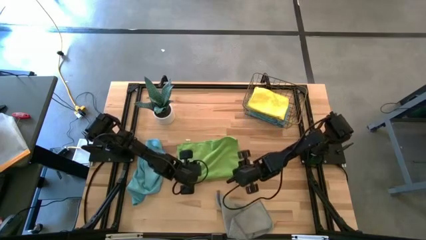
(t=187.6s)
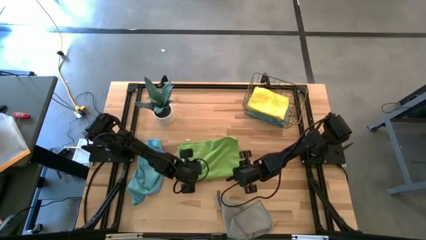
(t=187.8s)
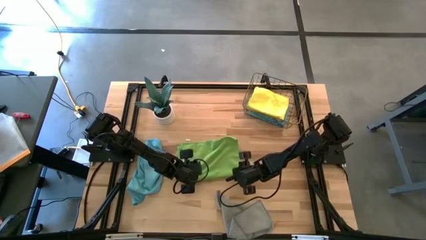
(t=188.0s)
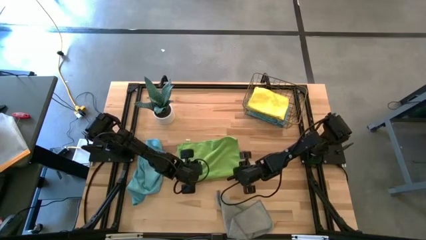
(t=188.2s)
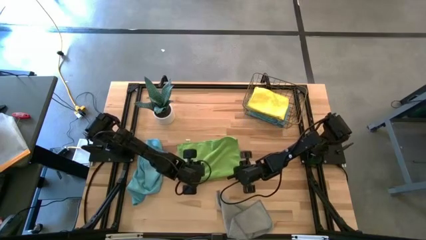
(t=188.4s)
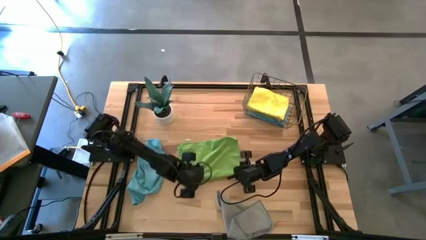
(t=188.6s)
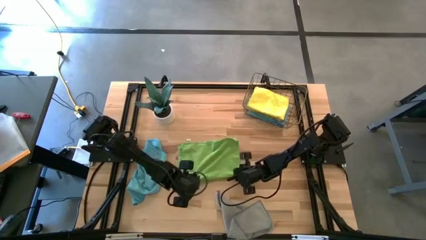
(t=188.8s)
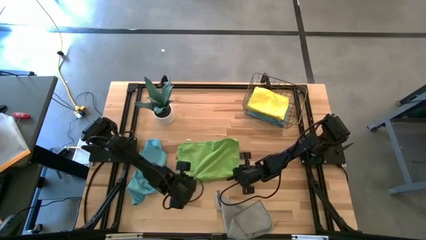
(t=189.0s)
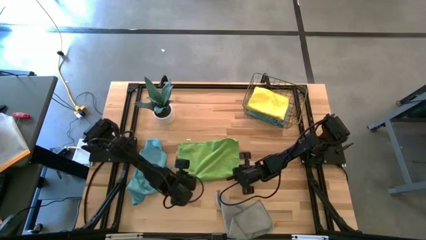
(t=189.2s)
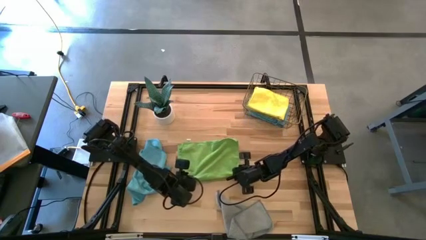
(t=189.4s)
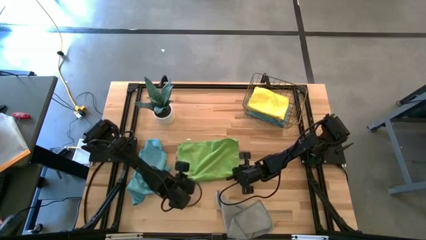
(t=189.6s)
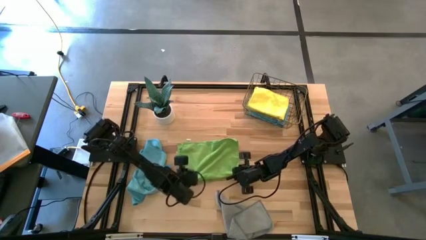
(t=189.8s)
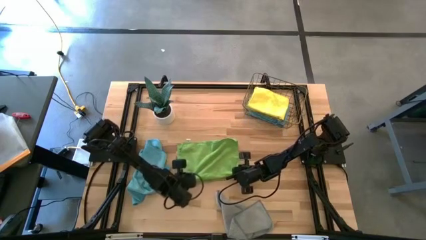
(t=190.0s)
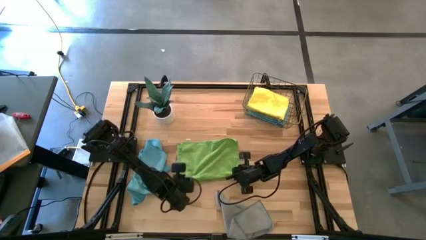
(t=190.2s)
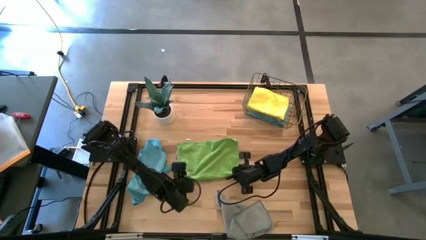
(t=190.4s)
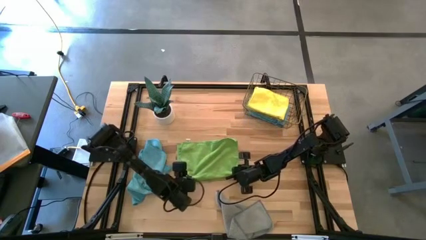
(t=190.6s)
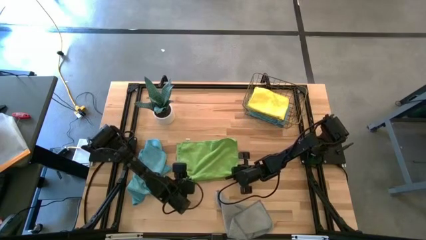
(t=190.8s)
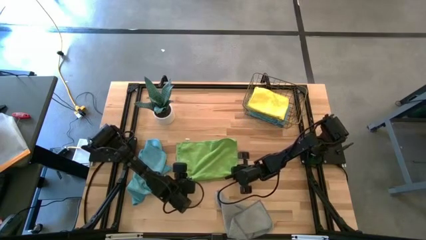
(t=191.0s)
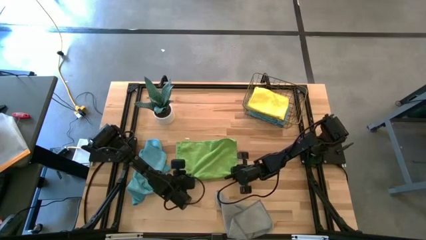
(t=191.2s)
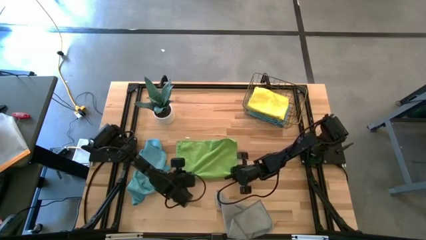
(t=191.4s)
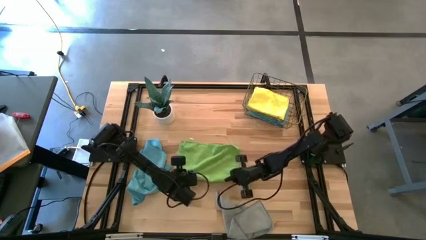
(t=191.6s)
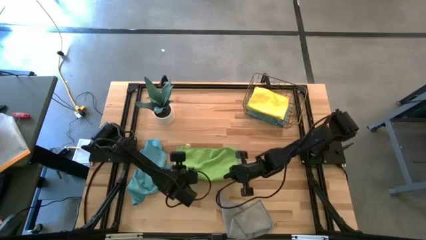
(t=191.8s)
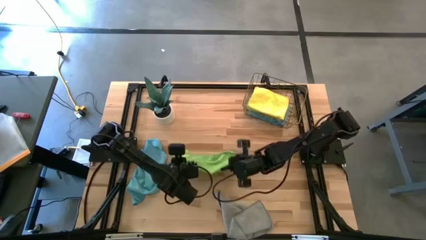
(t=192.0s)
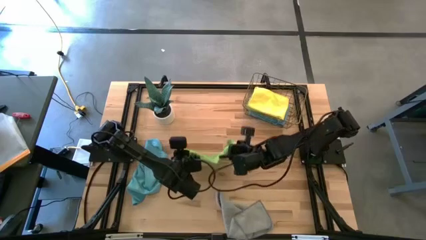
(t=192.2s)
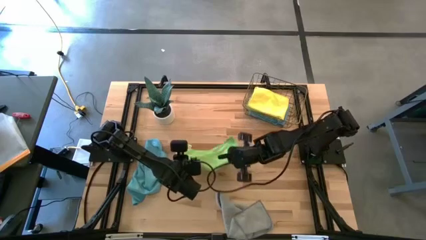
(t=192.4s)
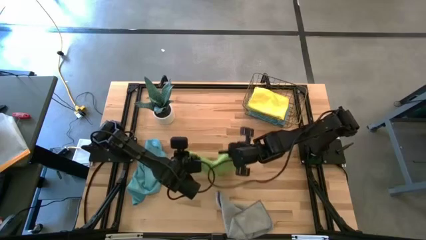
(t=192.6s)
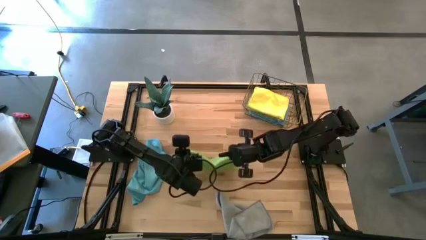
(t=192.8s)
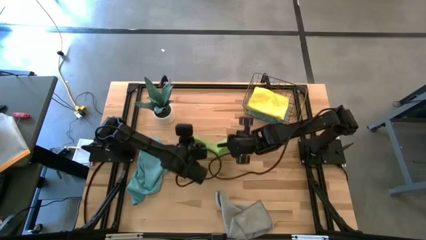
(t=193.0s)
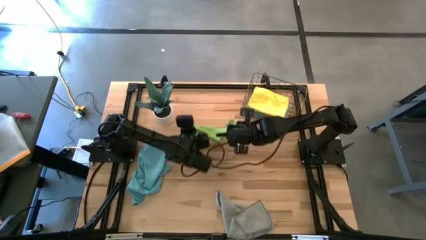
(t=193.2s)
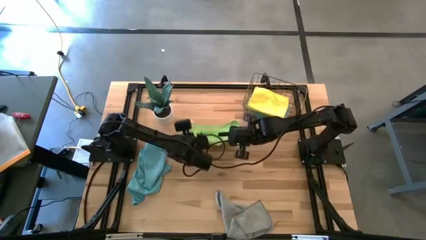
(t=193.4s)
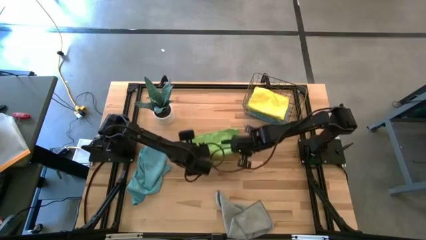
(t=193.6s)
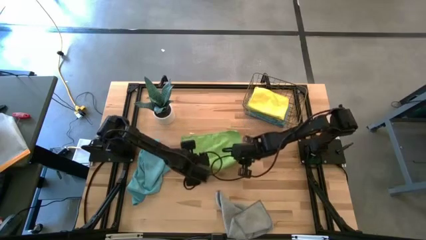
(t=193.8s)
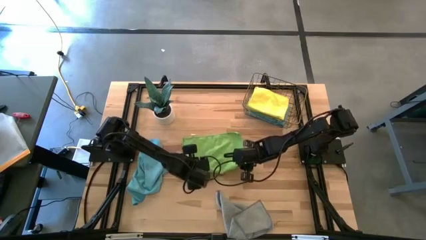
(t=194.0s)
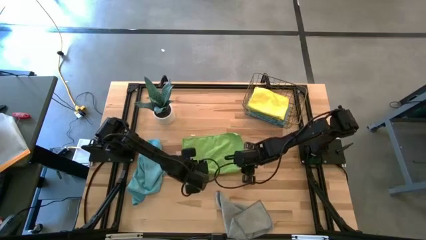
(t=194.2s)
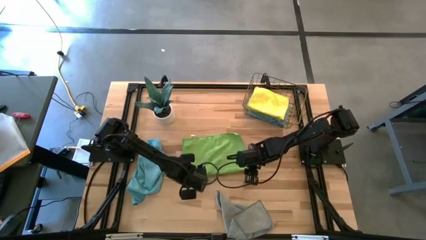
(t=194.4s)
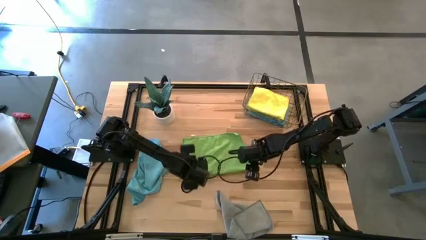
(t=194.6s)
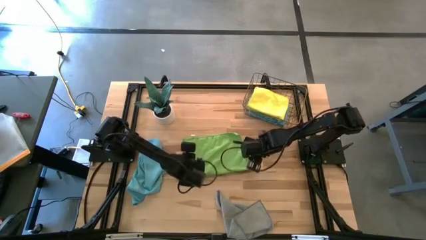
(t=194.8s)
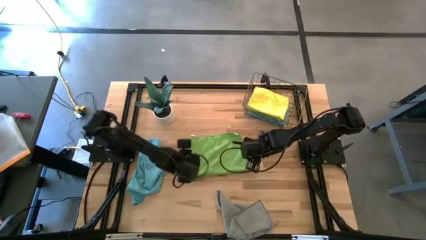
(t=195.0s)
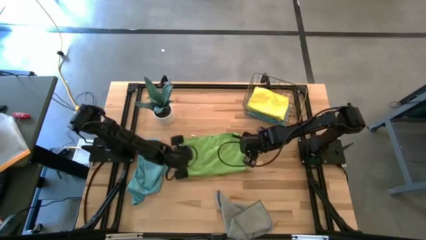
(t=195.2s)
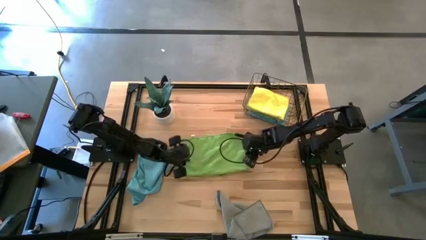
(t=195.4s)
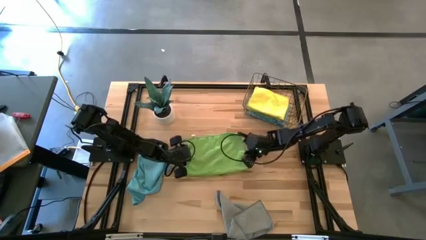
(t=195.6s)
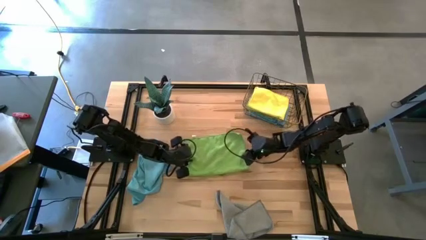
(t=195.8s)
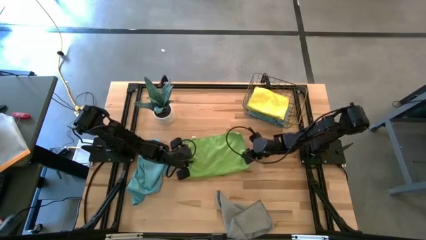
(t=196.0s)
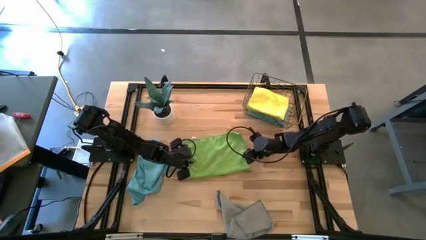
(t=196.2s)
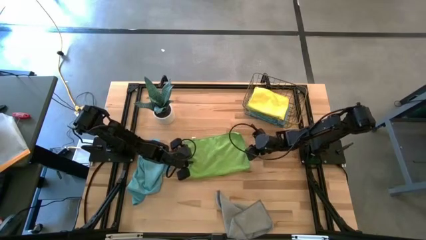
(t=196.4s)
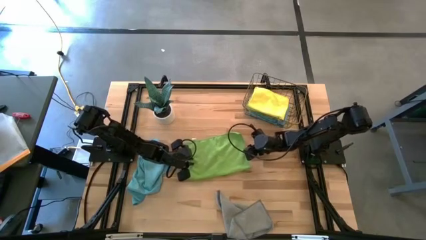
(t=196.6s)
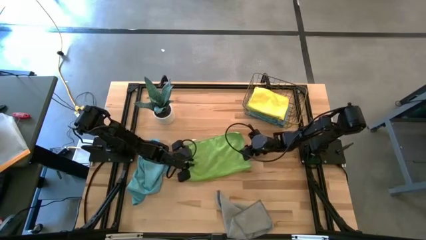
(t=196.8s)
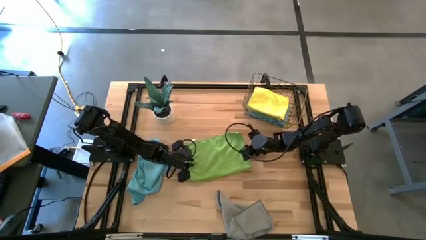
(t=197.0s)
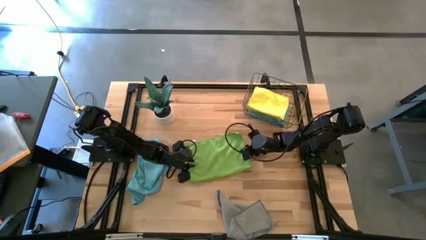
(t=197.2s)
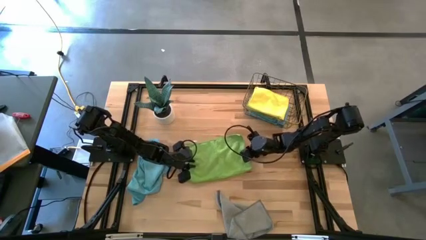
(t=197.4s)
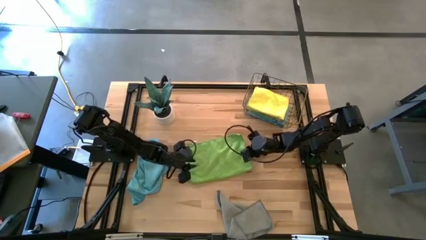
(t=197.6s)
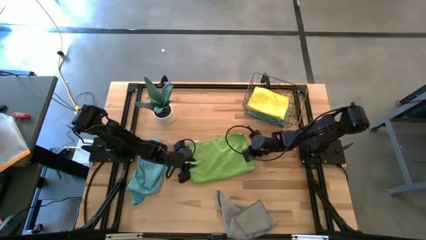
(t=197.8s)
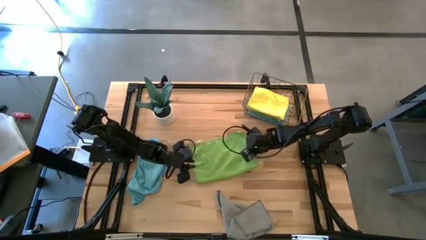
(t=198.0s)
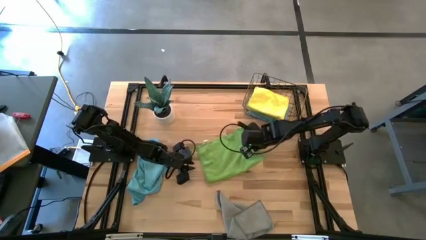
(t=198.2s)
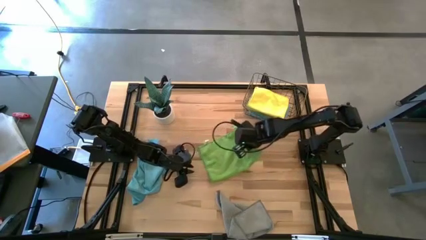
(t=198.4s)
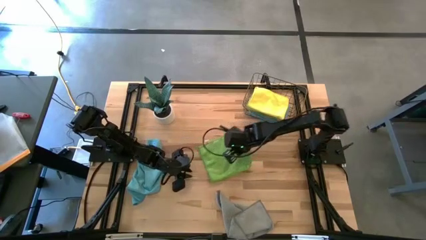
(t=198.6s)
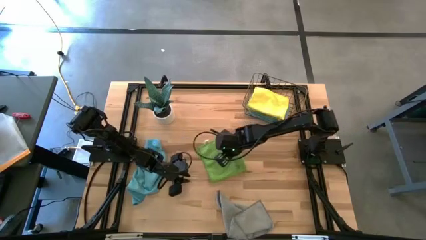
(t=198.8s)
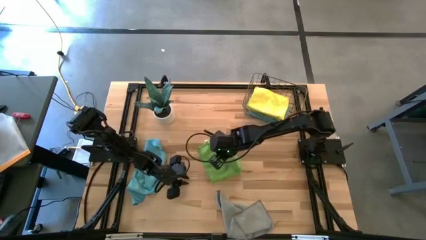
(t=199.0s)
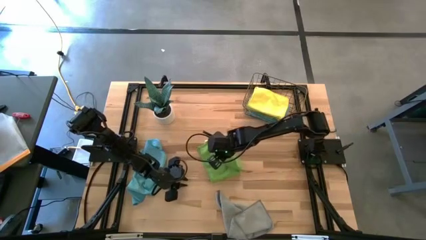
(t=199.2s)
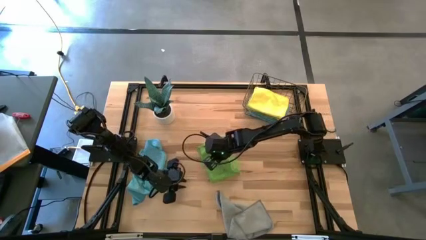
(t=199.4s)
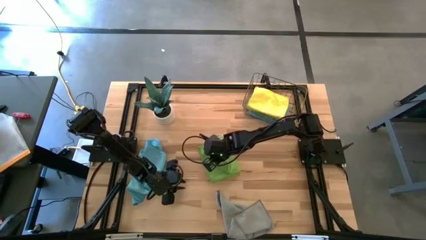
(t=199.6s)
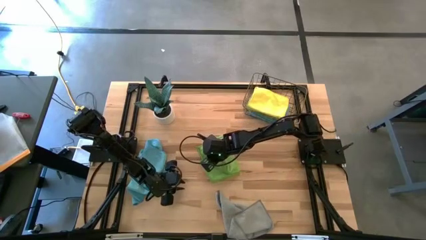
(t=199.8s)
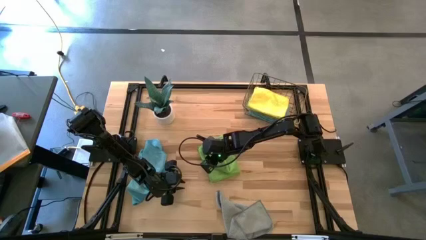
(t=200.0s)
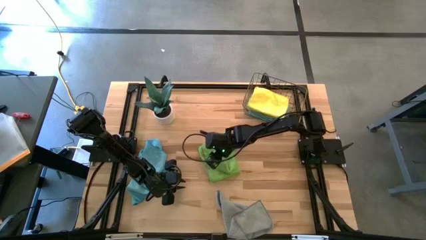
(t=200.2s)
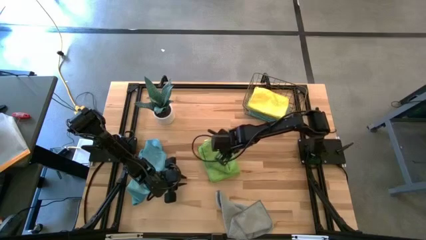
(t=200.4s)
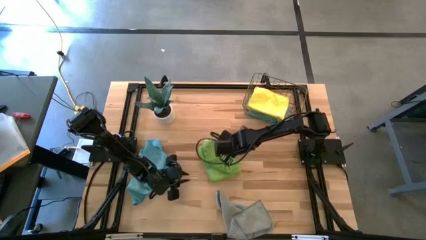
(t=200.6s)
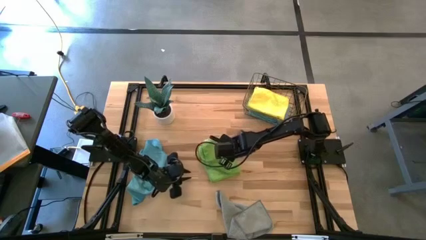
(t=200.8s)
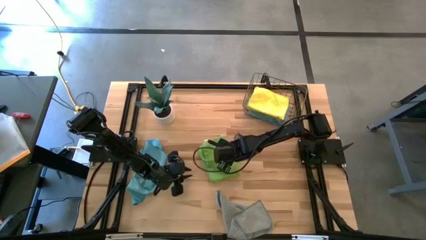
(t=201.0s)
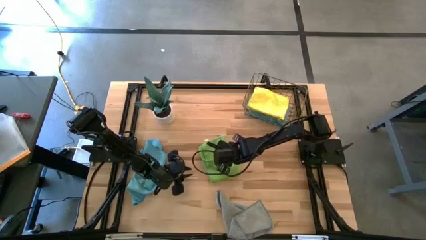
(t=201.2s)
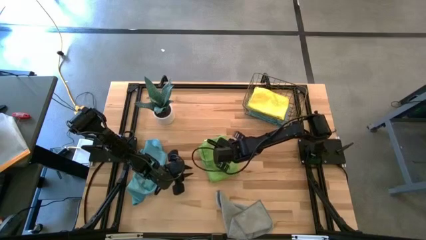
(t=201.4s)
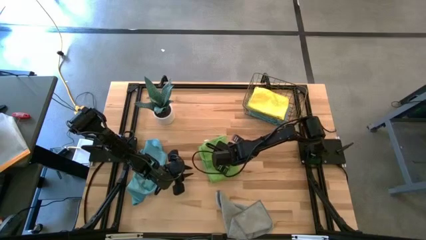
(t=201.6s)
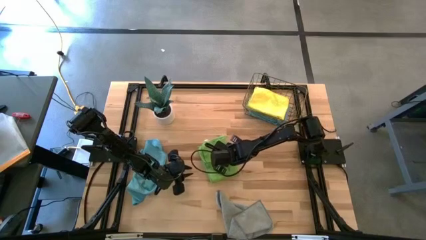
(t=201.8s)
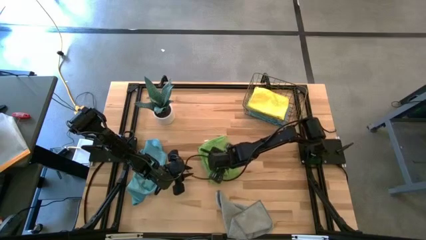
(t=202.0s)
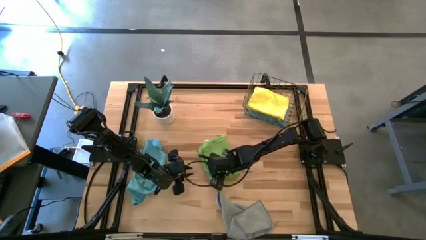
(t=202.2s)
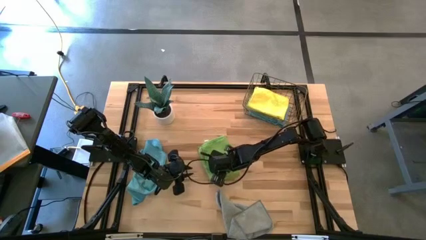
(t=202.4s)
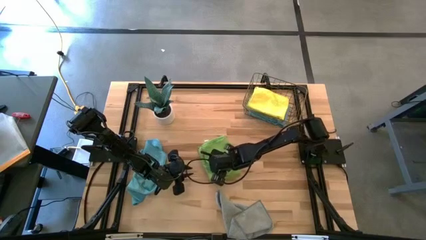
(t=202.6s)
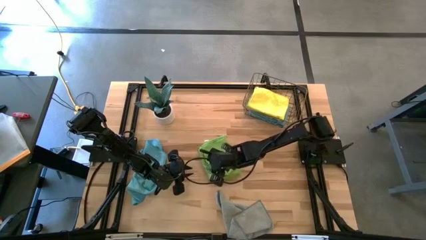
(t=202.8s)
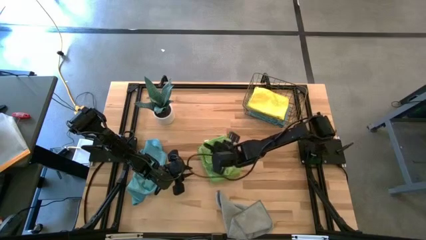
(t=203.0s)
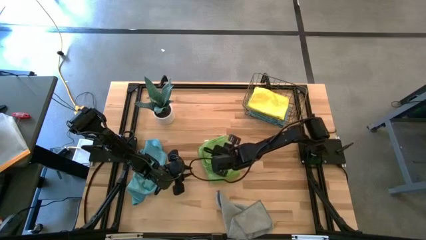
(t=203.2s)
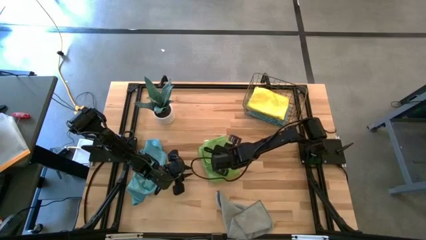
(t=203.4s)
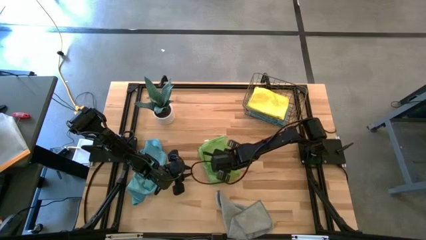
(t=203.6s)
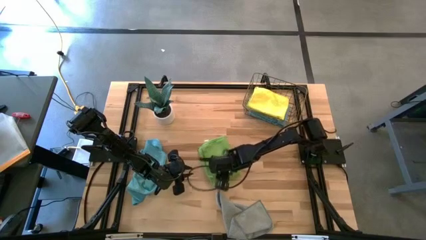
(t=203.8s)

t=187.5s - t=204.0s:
Task: Fold microfiber towels
Fold the green towel
